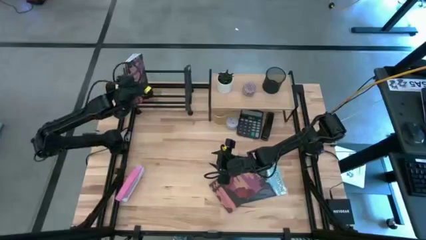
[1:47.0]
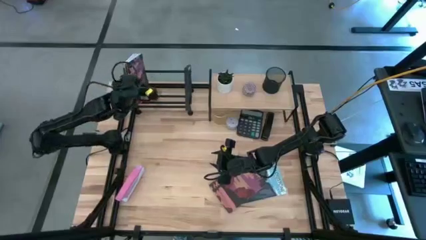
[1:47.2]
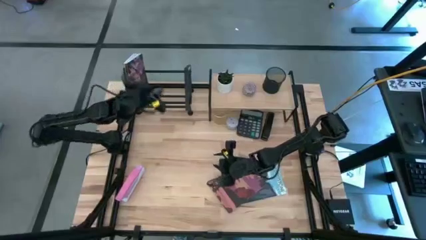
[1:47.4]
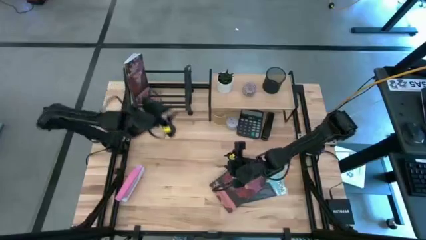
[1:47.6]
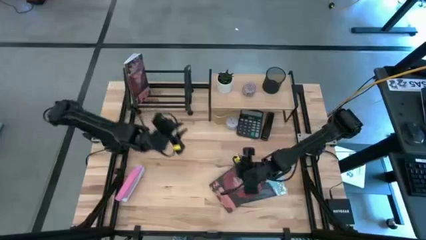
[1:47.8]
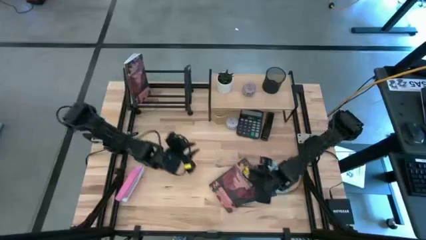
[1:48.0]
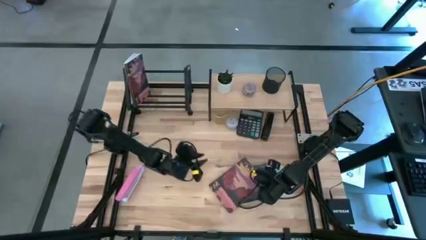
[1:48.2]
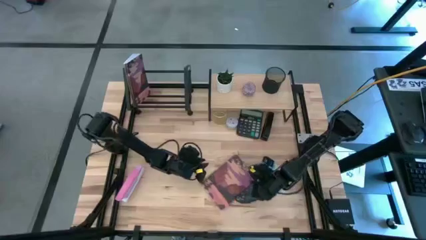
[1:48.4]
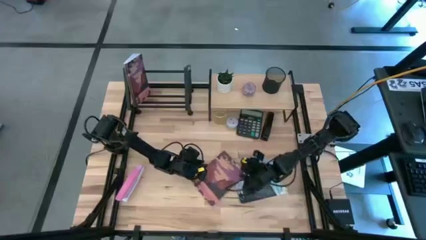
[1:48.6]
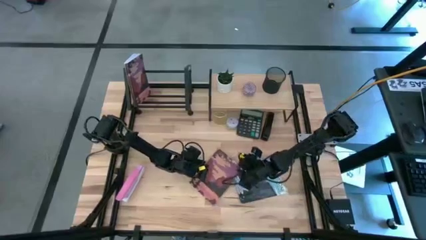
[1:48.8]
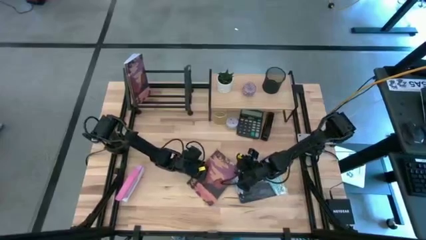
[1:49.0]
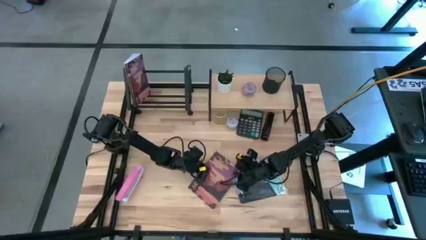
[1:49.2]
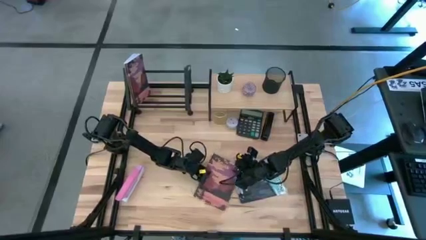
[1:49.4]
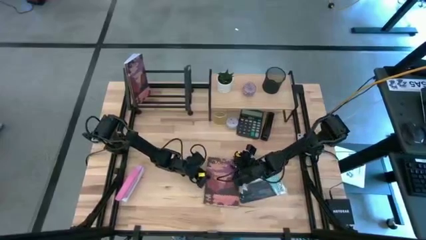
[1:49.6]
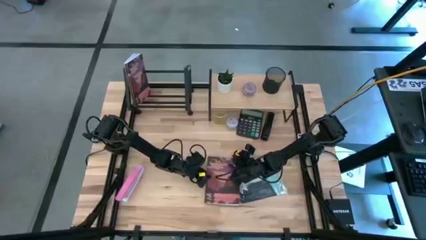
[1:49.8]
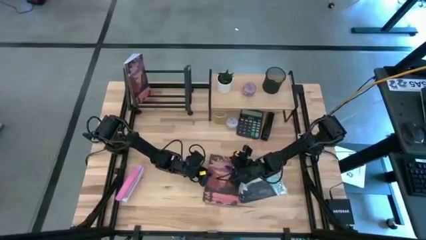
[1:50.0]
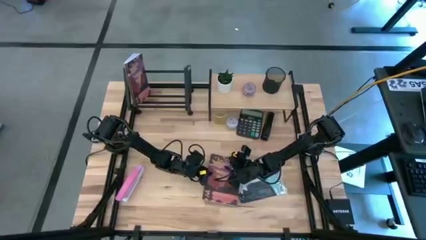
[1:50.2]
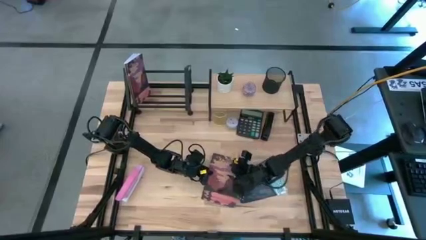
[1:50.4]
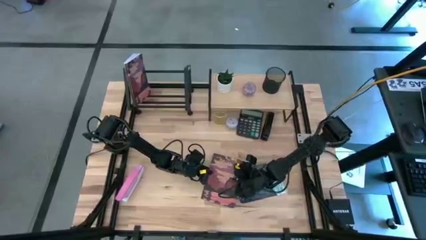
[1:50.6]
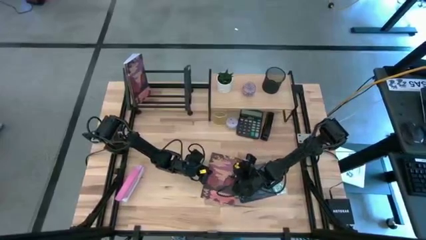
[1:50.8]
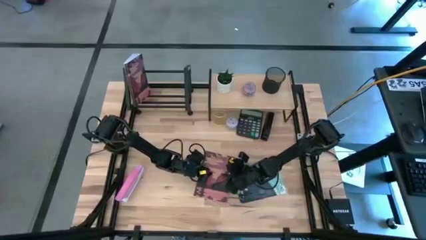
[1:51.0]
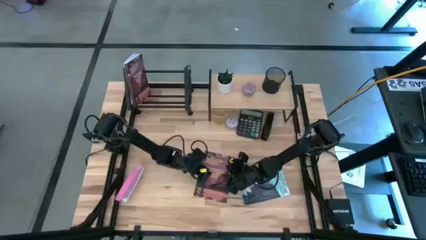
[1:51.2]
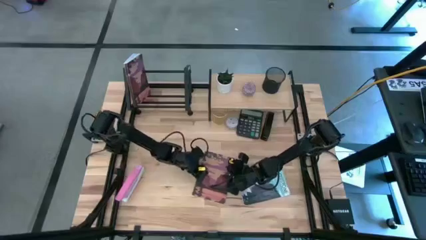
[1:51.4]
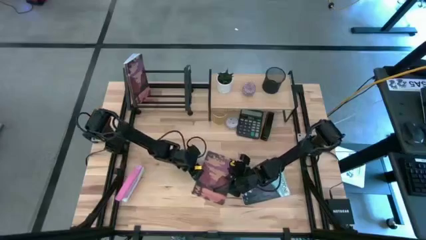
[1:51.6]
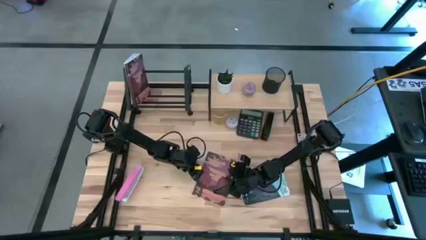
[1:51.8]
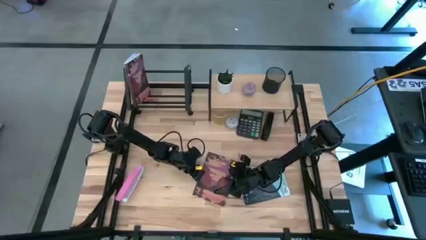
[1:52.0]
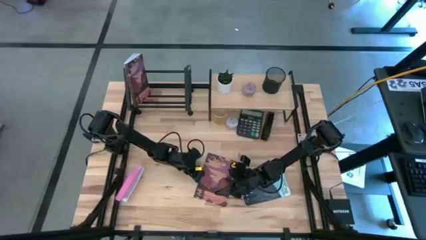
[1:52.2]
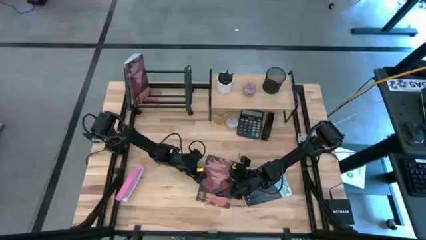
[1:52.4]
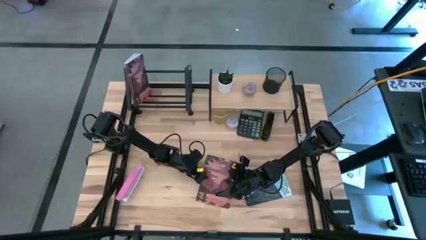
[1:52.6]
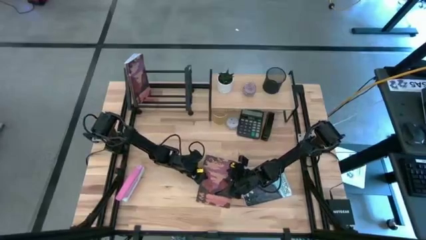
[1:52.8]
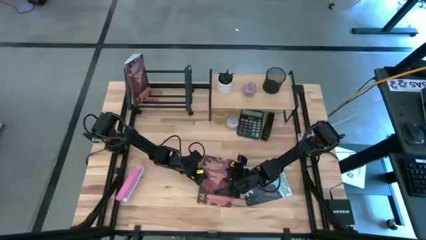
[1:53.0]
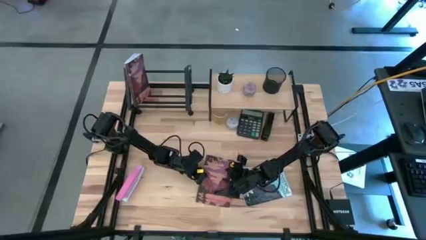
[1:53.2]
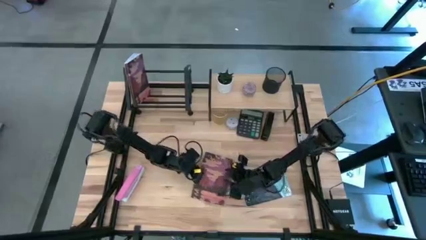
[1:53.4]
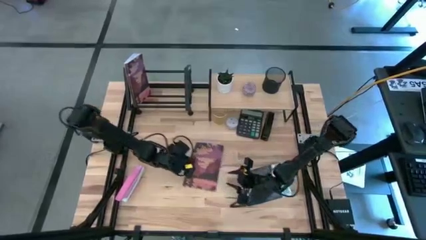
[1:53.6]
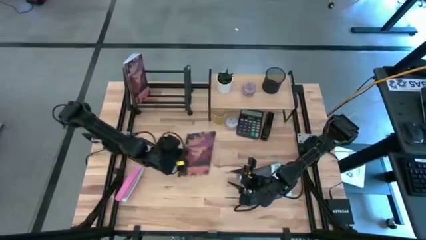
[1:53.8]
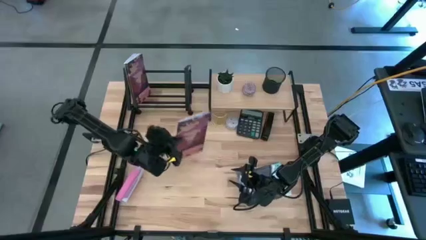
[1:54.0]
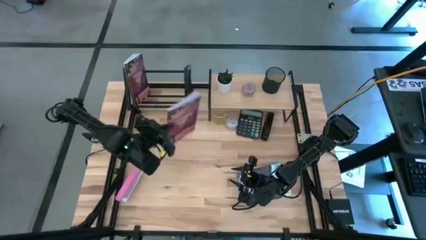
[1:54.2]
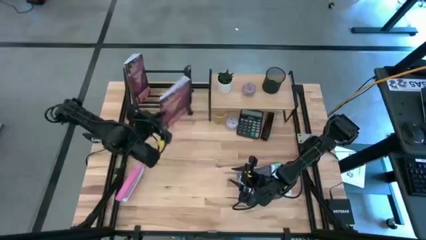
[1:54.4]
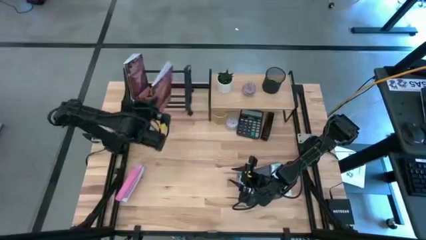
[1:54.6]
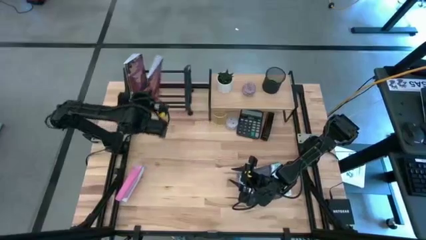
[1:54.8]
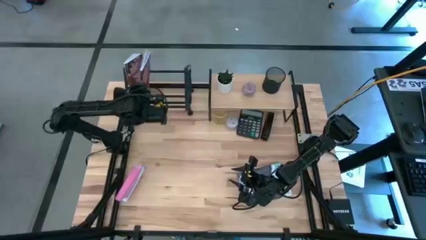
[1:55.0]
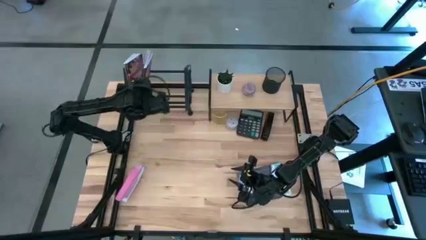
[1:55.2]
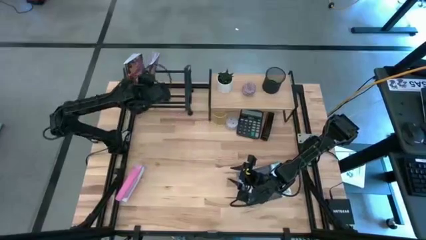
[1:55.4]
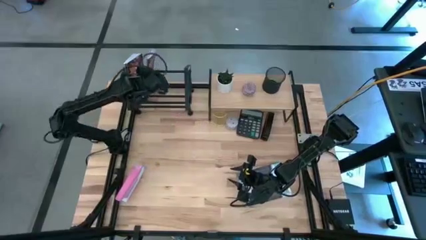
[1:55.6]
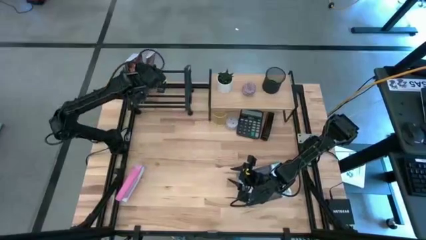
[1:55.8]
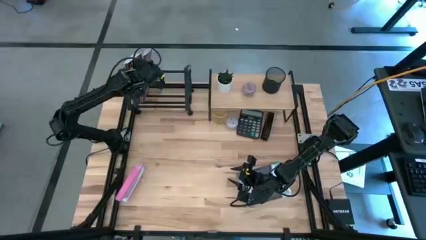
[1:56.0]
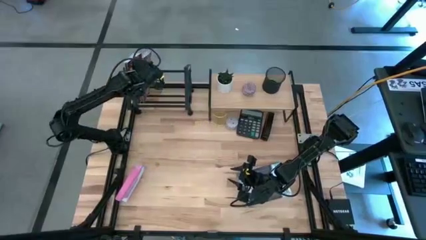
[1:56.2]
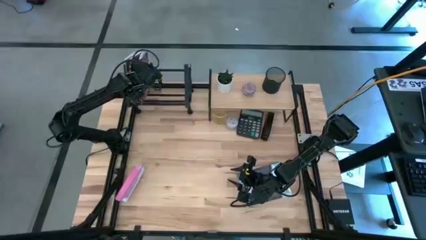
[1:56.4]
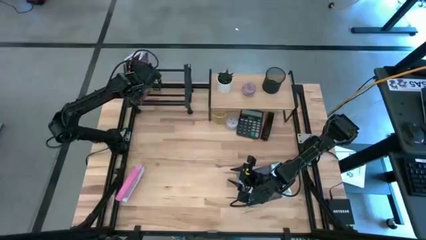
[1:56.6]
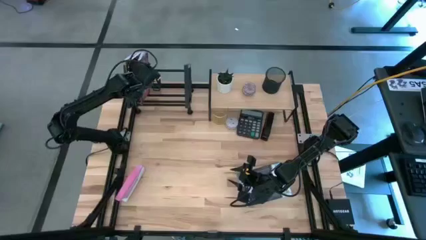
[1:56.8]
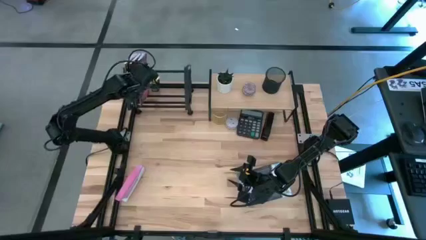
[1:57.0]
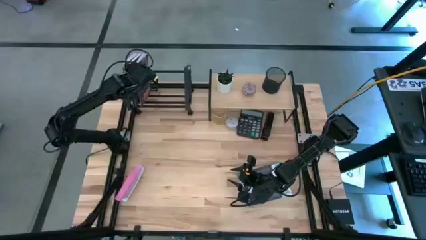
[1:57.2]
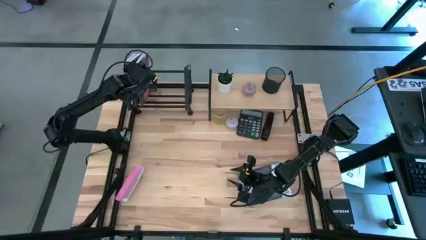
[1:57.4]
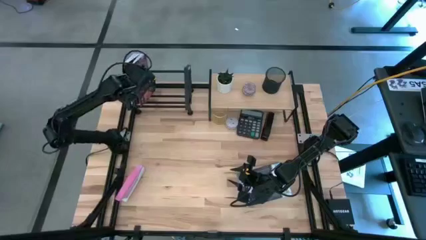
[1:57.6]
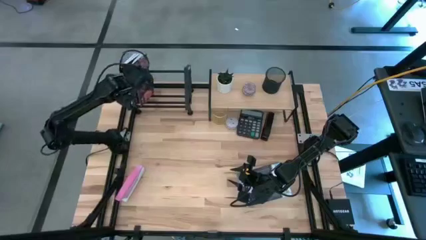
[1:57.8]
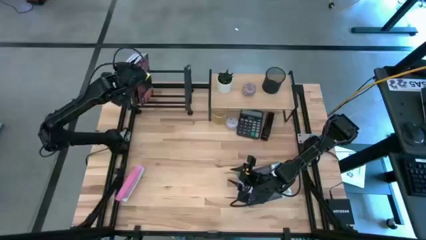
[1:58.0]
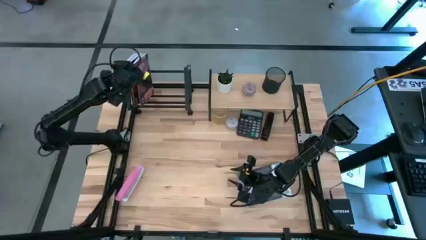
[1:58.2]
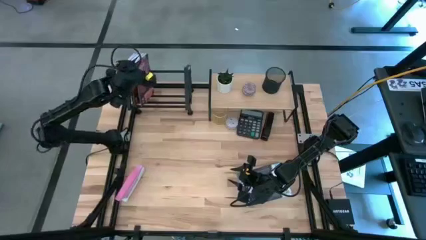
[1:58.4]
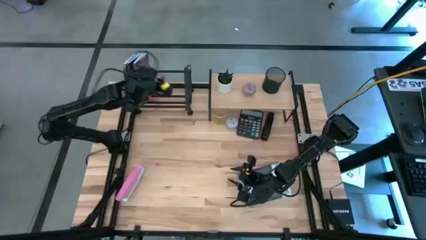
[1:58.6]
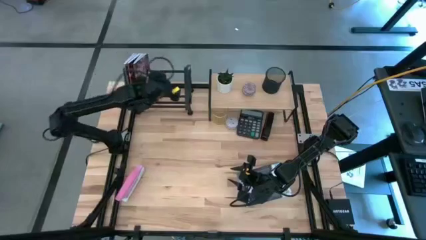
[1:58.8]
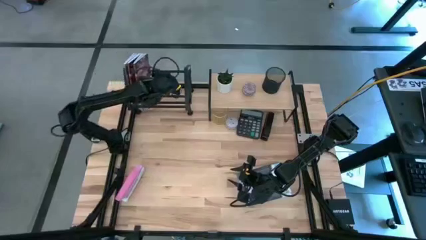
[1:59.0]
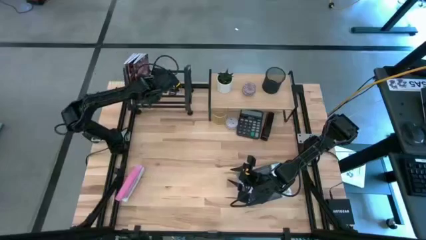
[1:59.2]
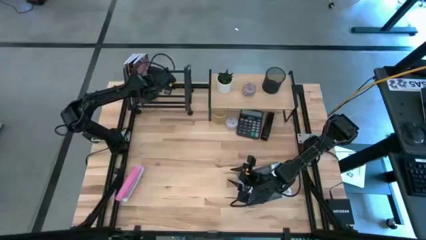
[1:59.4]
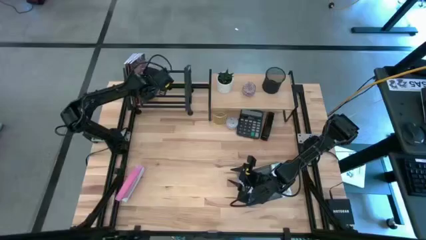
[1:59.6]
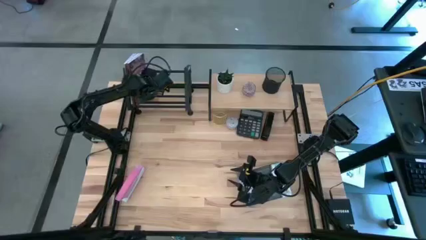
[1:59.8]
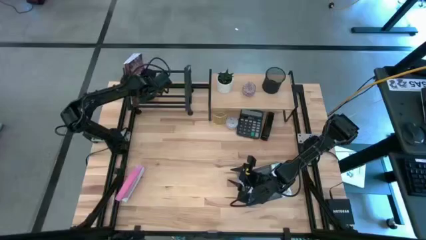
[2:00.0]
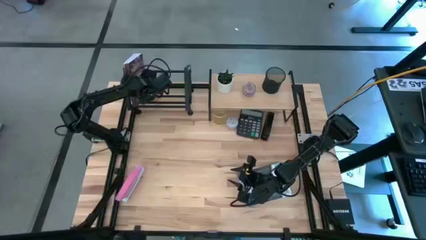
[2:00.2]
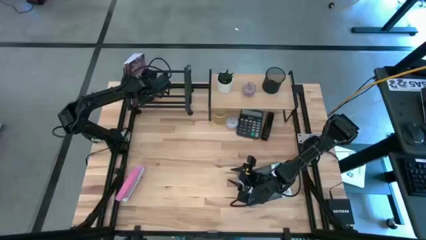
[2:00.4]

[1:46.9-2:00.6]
Task: Stock shelves
Put the purple book into the book holder

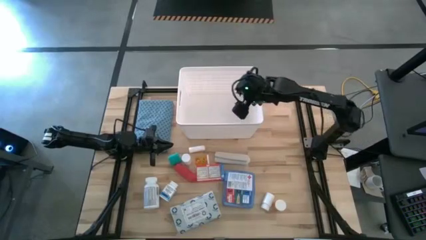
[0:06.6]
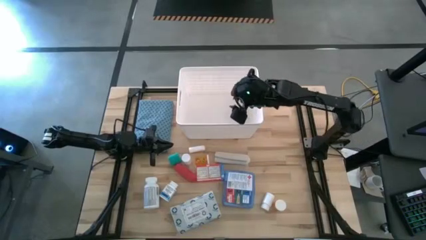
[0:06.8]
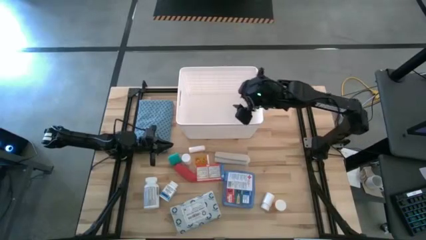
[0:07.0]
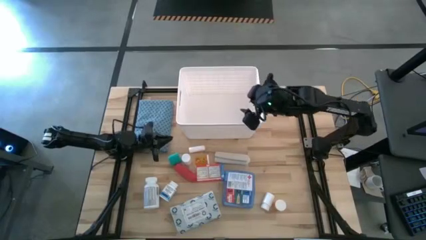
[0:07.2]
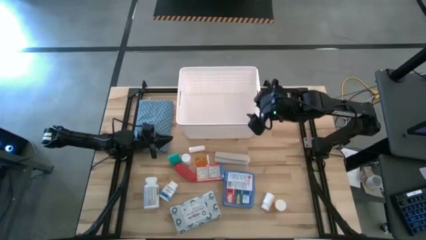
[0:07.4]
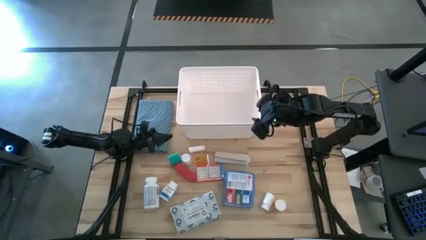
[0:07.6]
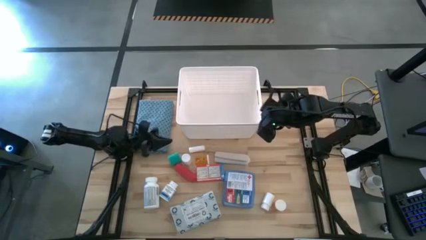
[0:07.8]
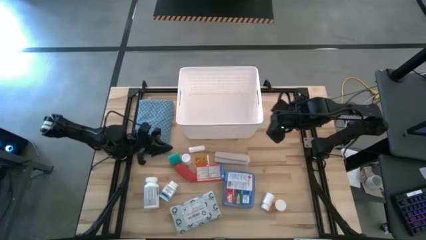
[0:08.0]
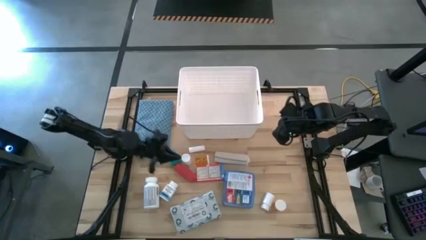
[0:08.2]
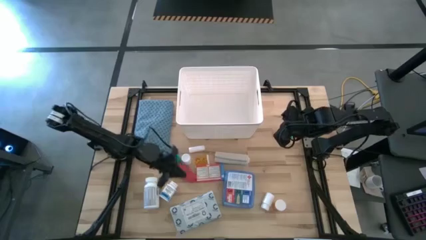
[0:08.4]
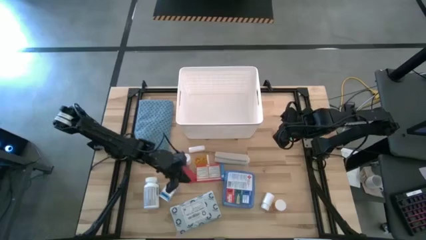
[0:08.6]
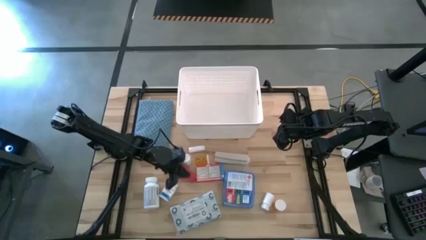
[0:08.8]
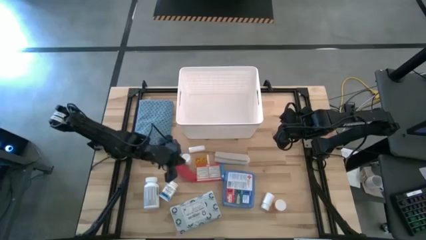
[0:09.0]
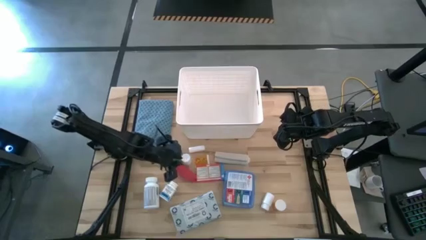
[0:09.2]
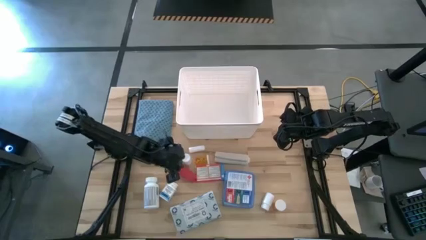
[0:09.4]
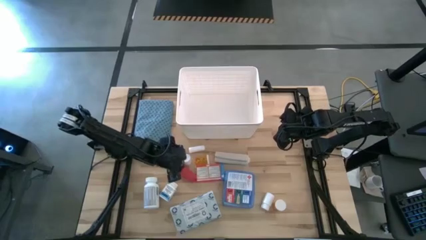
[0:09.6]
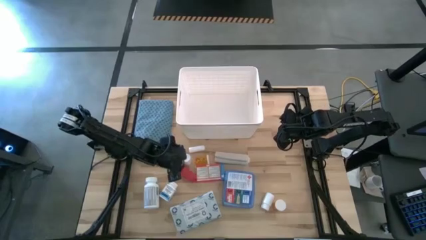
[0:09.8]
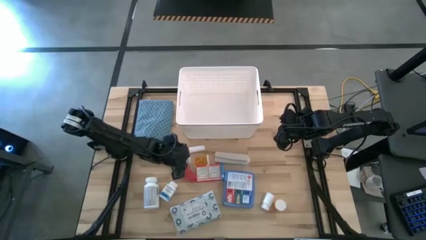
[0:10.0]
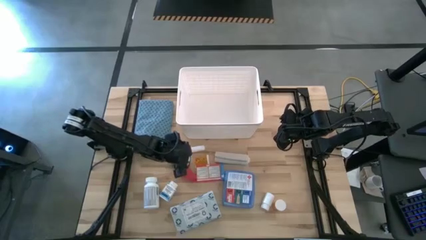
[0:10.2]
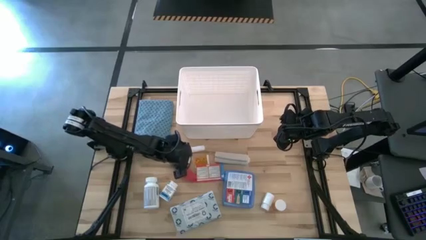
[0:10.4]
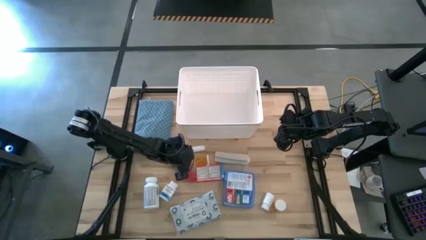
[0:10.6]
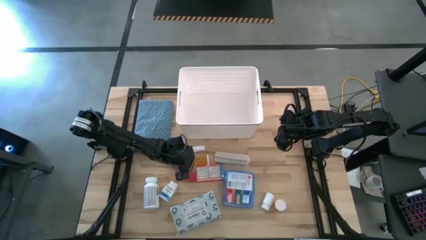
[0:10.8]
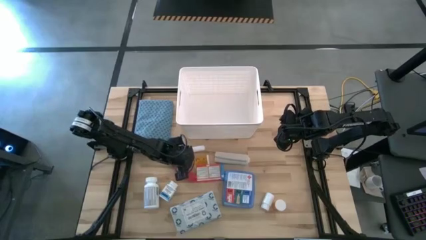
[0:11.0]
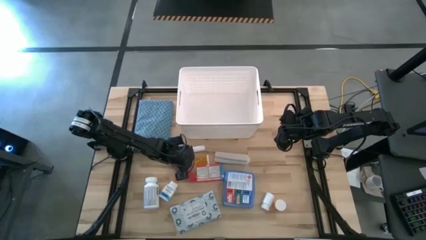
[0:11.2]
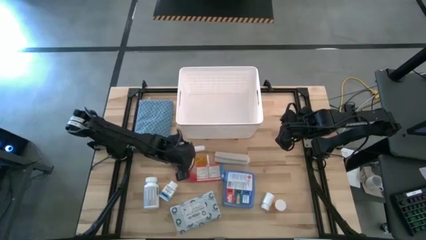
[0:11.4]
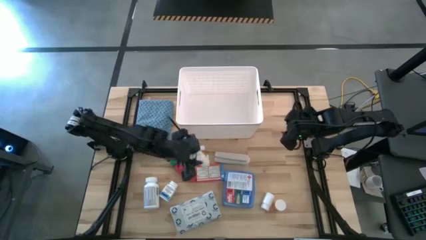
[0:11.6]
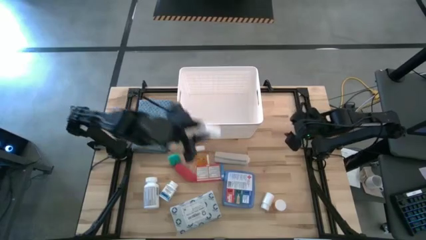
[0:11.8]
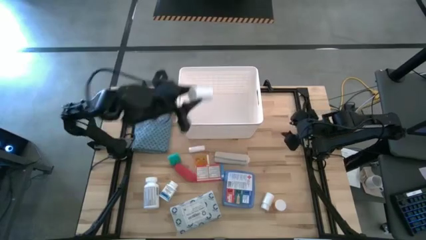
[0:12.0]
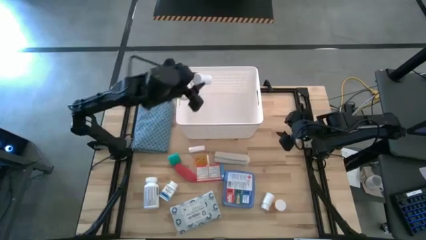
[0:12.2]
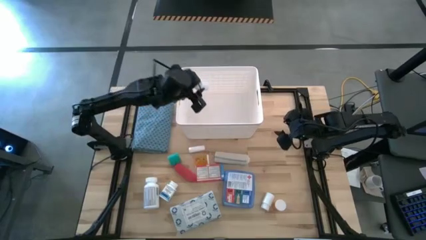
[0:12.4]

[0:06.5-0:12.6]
Task: Pick & place medical supplies in basket/bin
Put the white medicine bottle into the white bin
